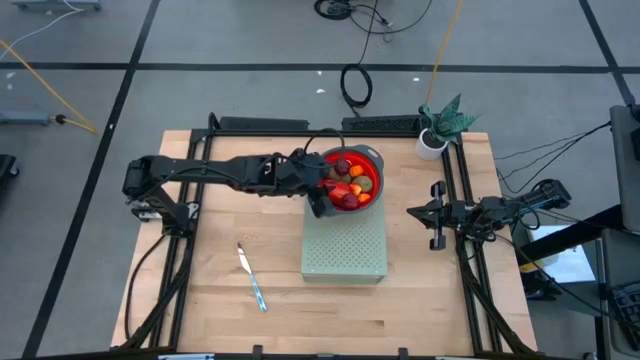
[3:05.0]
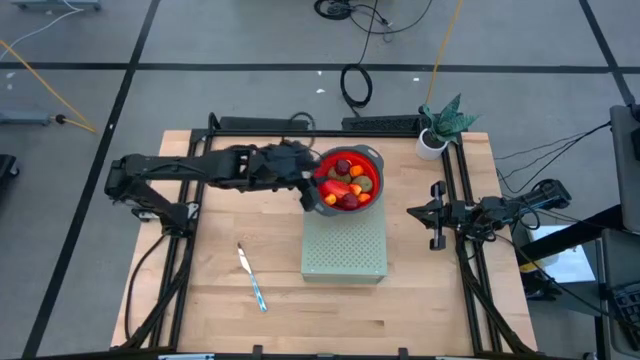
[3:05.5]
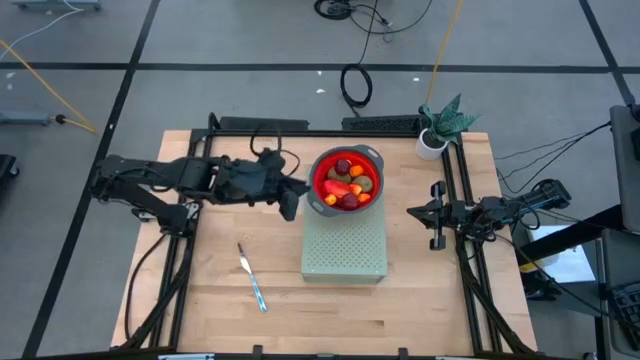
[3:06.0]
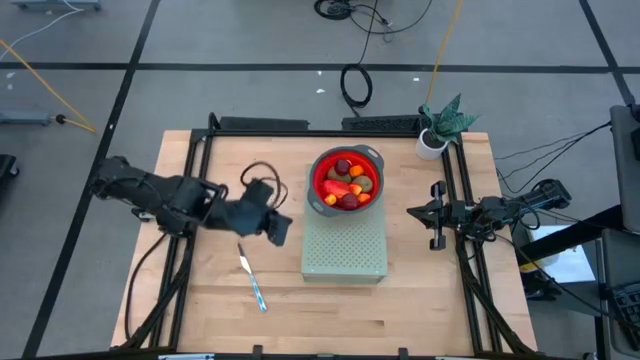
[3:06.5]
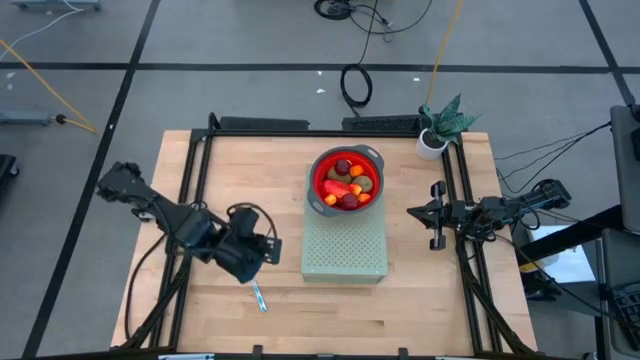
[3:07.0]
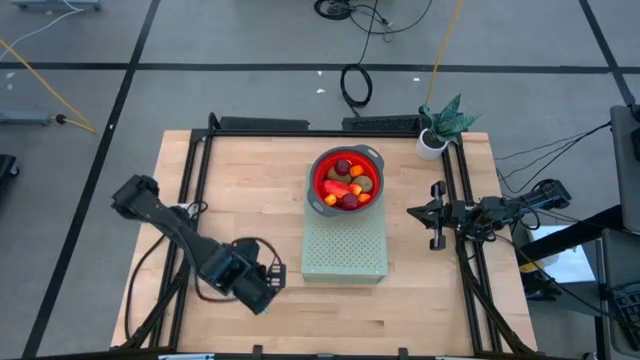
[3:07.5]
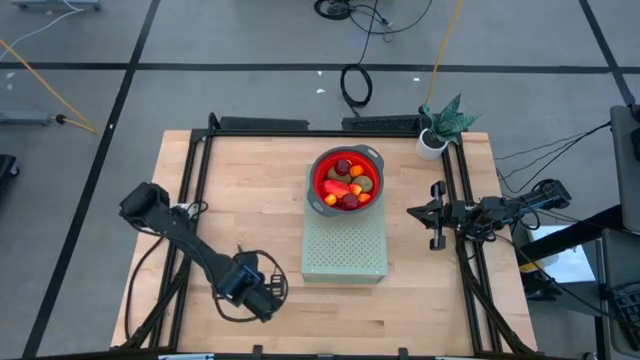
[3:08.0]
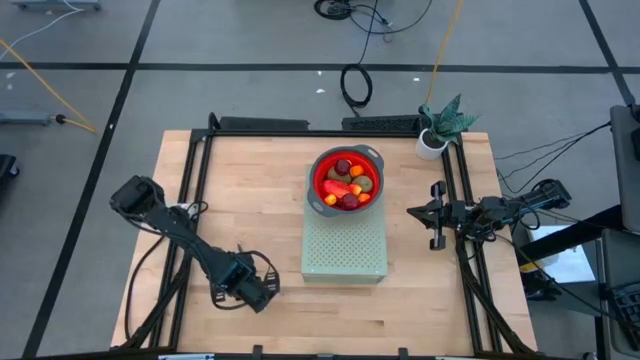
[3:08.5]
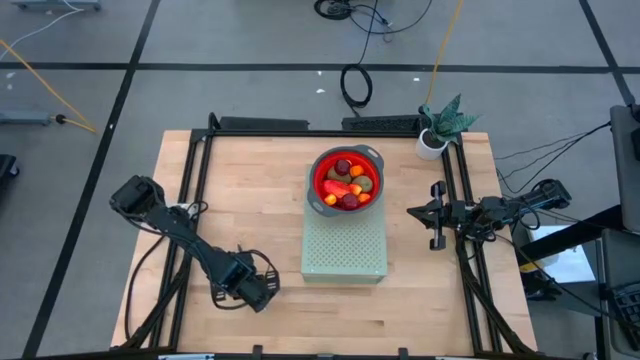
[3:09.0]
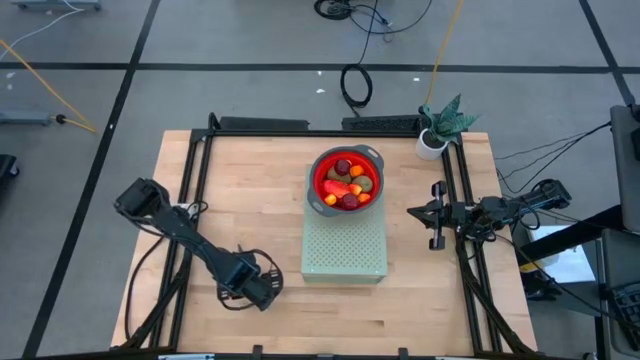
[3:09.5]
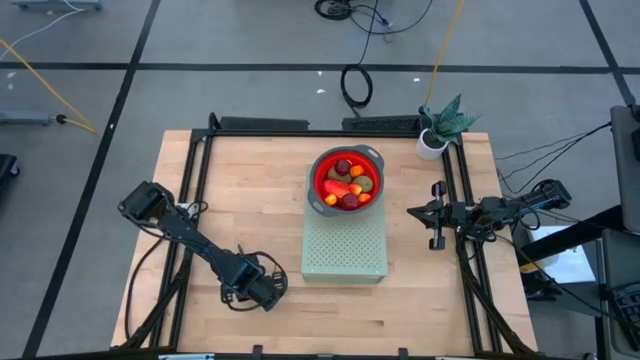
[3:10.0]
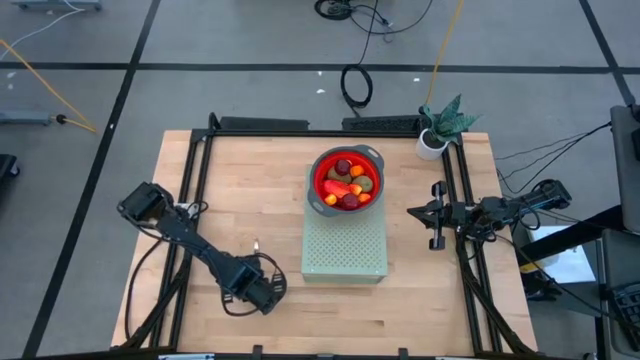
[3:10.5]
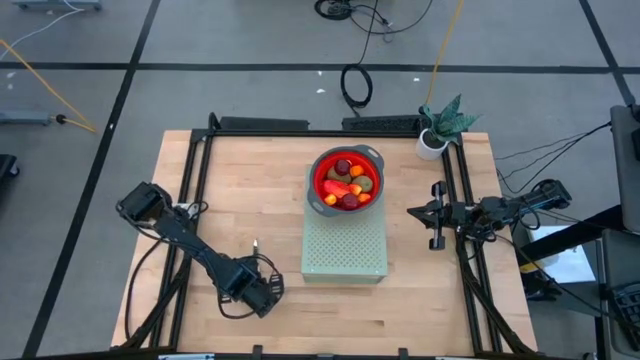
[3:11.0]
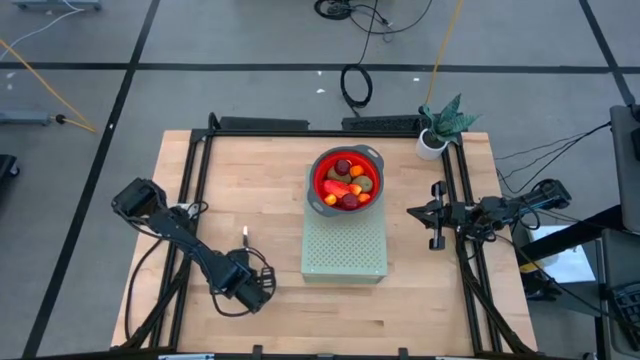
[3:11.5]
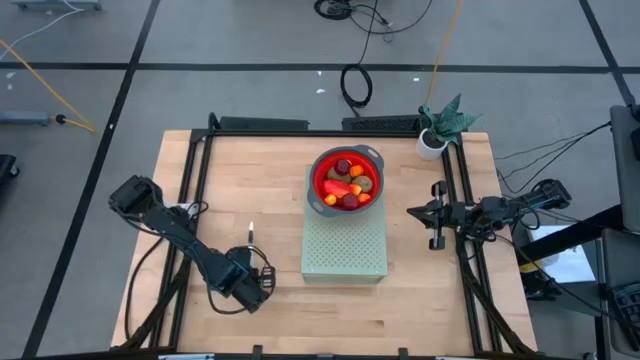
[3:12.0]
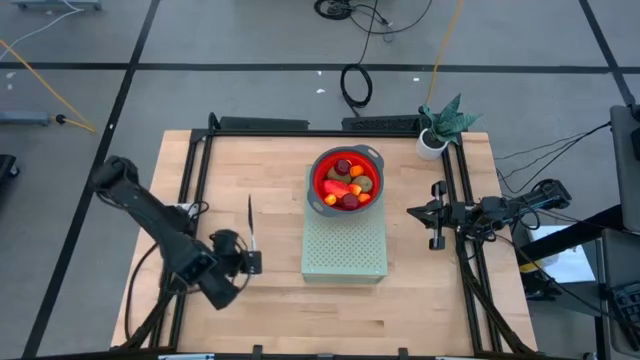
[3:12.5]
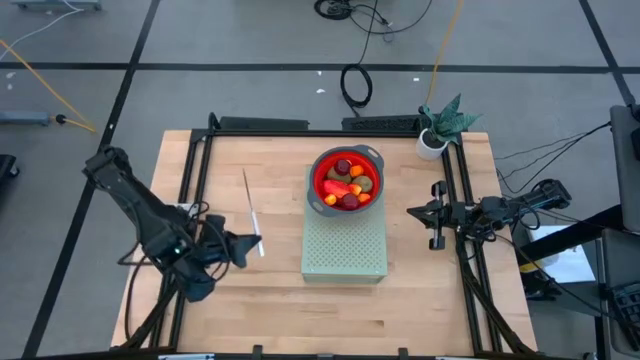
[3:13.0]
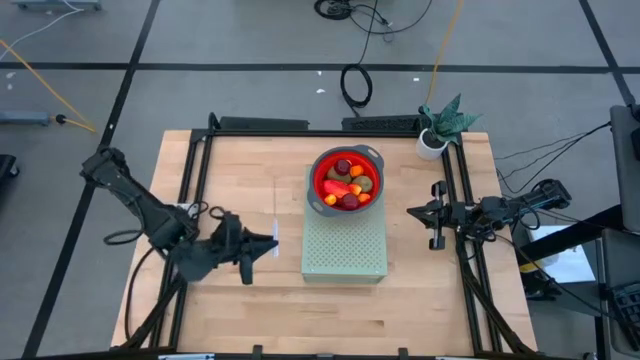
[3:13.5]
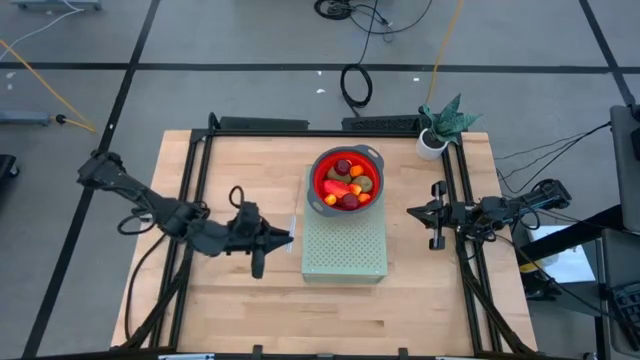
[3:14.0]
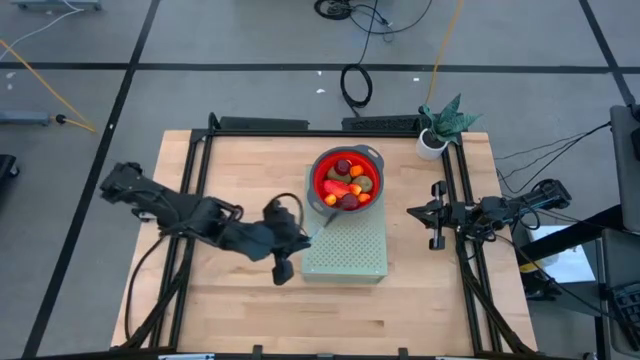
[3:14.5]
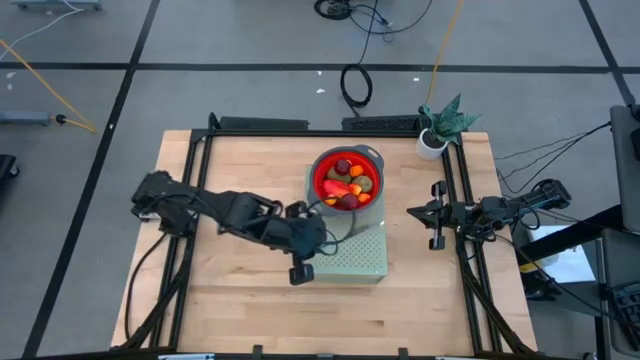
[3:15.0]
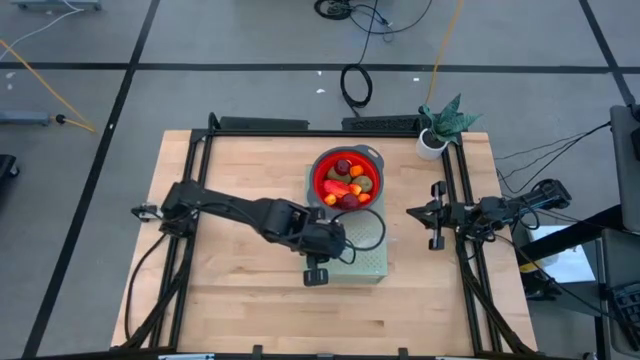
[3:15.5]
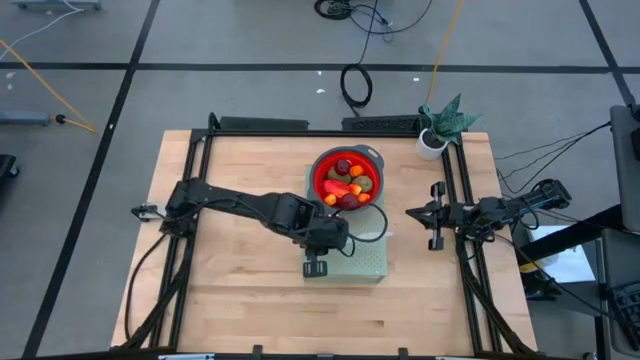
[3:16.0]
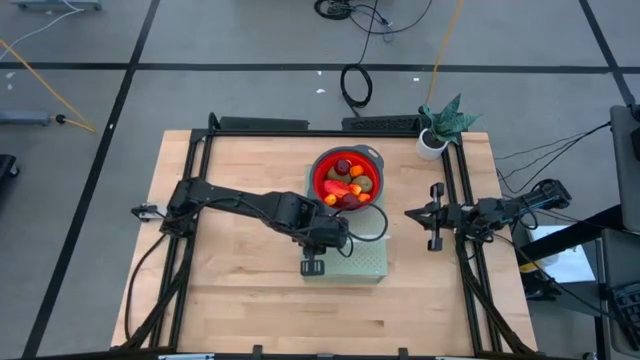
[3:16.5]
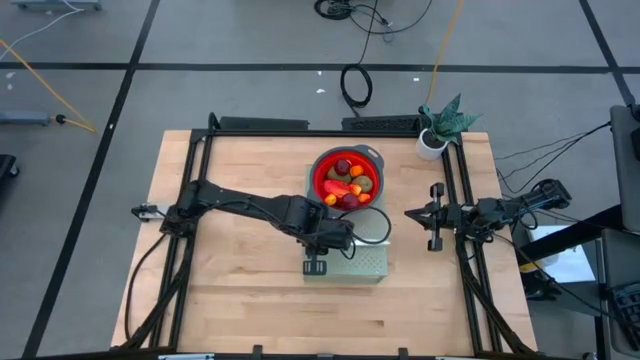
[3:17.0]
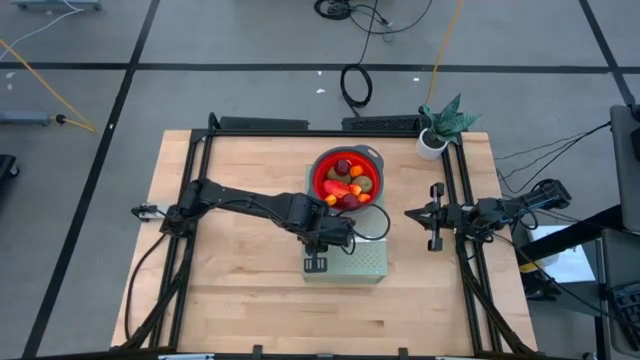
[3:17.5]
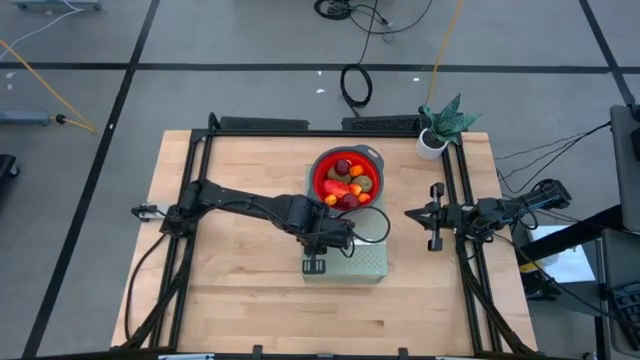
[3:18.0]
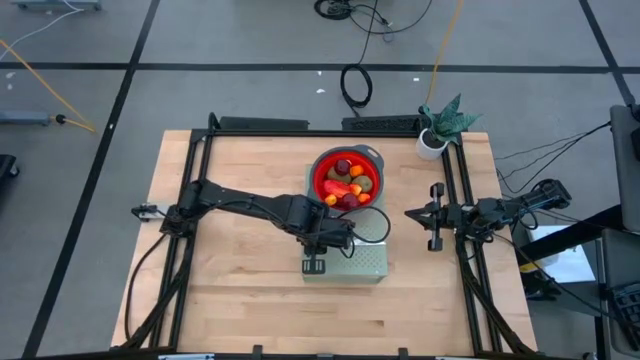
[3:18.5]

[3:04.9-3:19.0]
Task: Pick & Place Fruit
Put the white blue table knife on the shelf

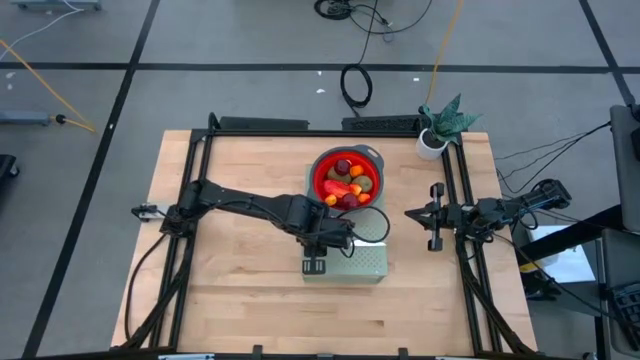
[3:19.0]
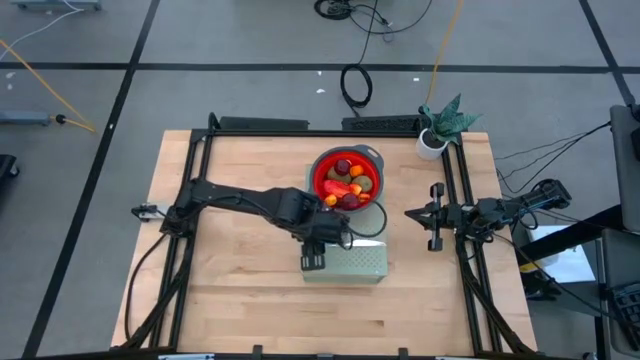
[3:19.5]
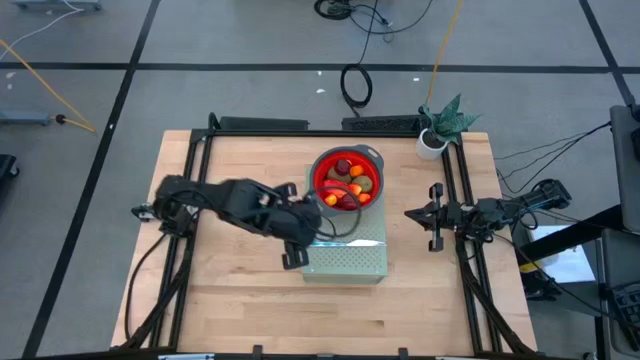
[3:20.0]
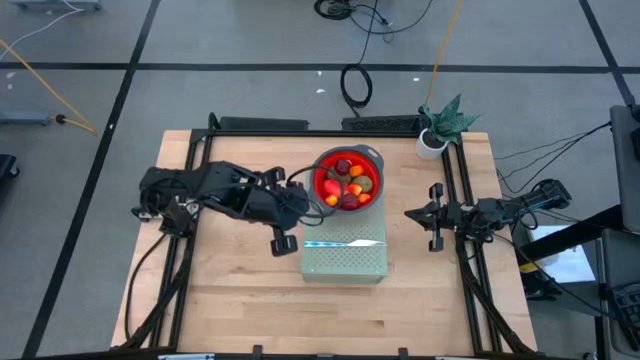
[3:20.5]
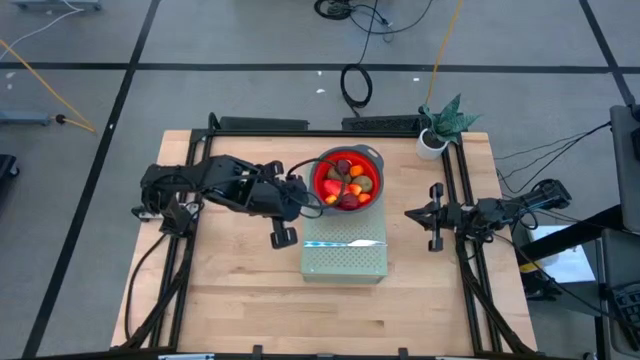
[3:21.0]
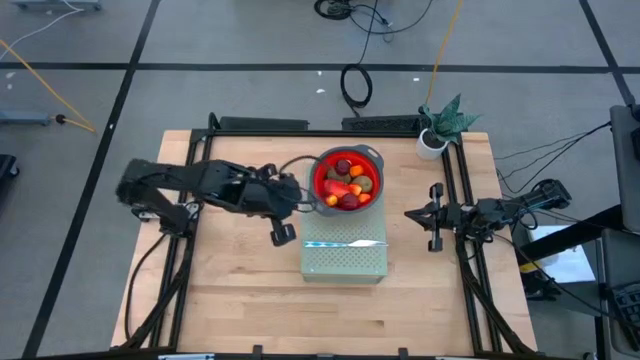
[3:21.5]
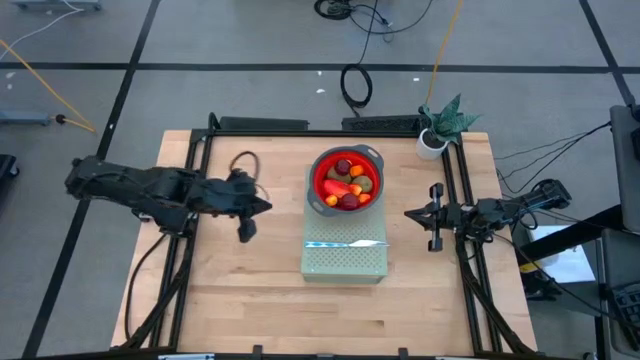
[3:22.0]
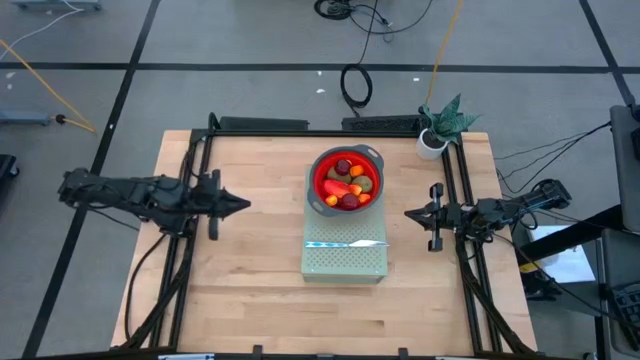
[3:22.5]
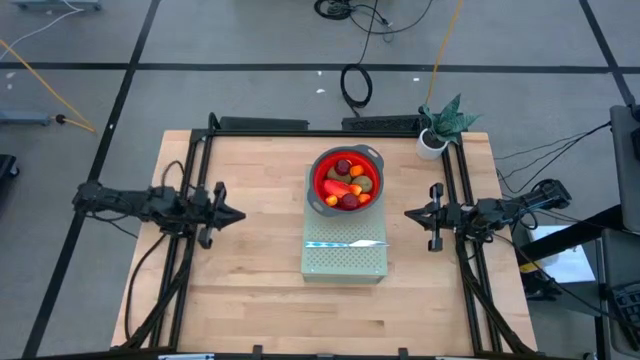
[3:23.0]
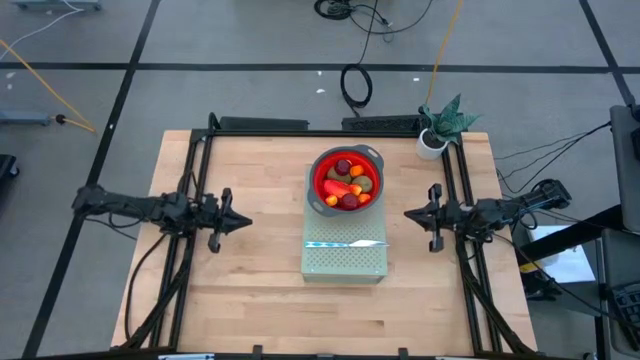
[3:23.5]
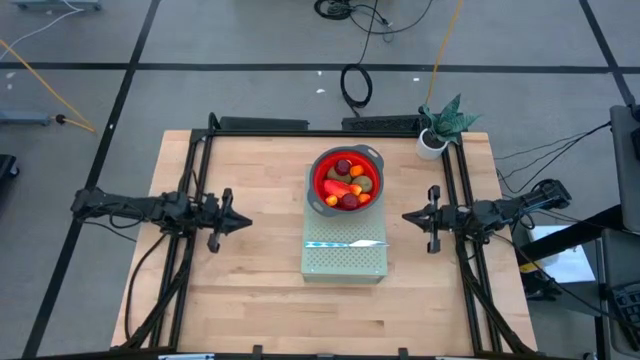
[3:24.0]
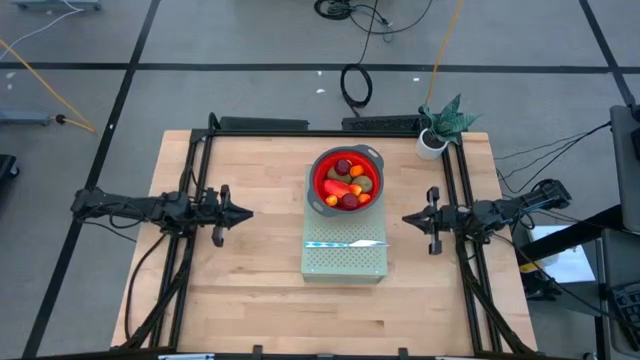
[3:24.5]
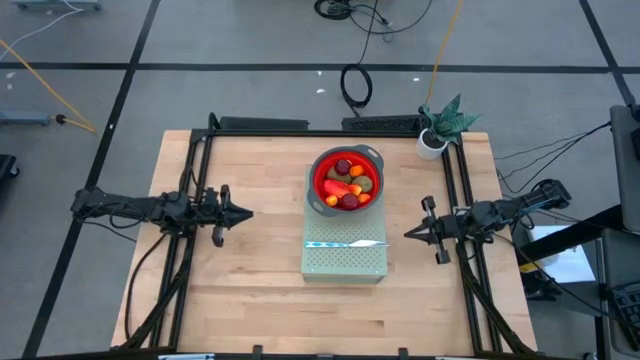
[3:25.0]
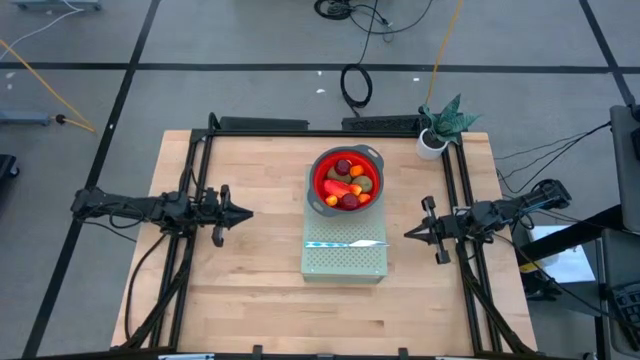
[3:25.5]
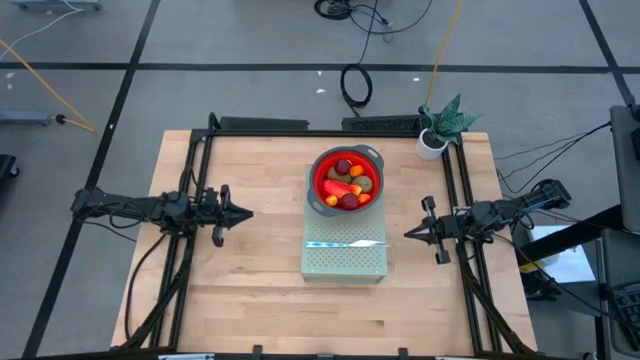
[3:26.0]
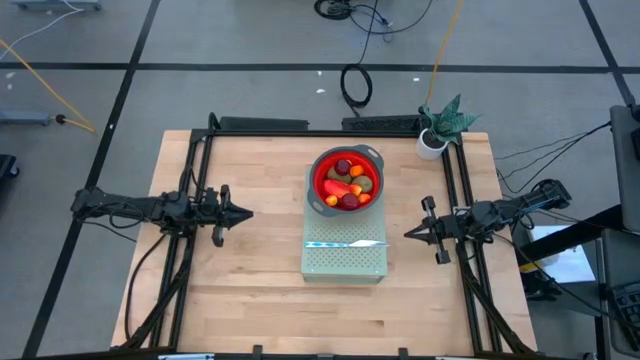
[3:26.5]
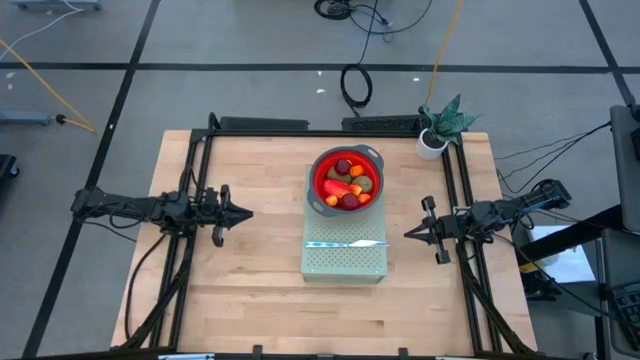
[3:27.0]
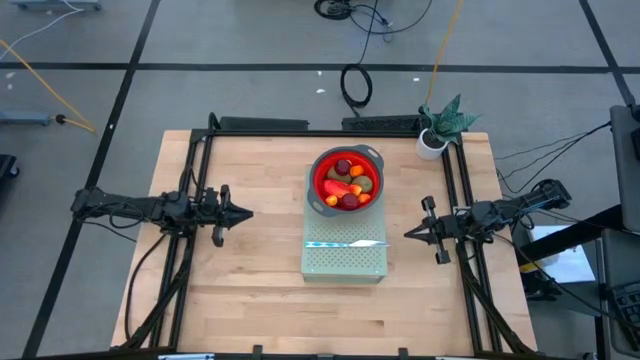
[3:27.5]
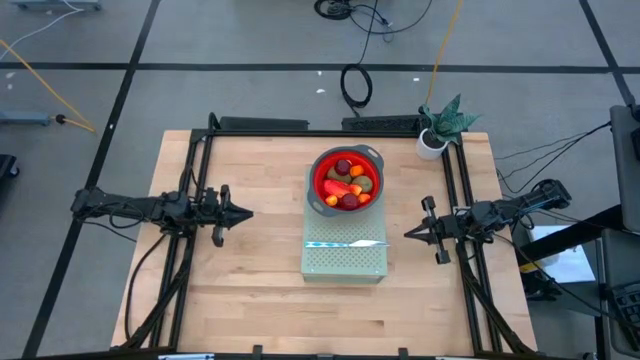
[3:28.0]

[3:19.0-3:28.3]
Return to Home Position
